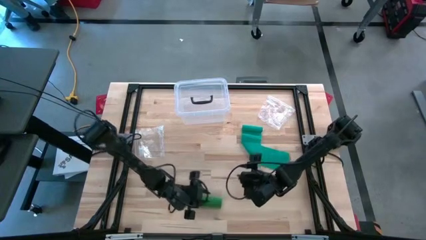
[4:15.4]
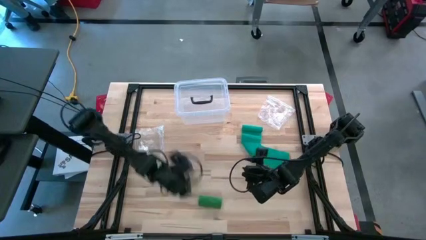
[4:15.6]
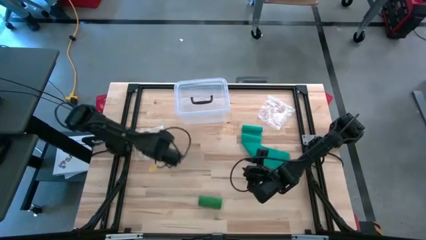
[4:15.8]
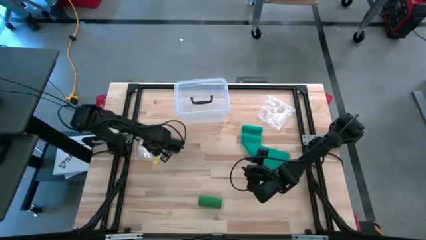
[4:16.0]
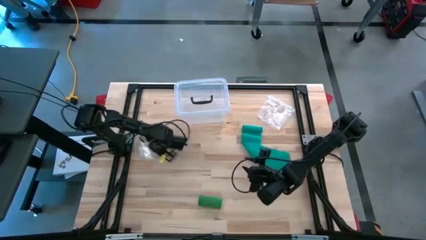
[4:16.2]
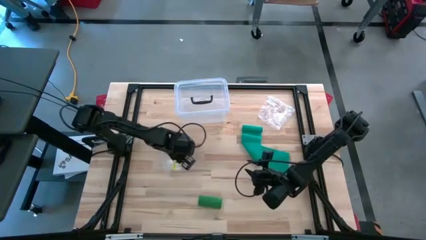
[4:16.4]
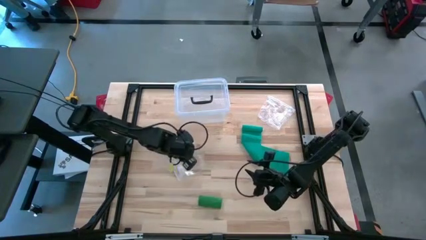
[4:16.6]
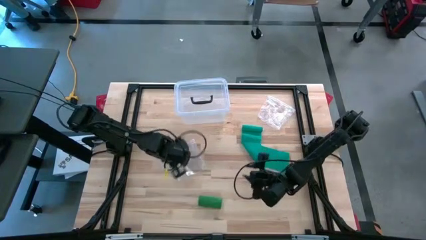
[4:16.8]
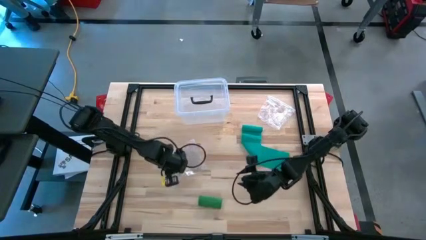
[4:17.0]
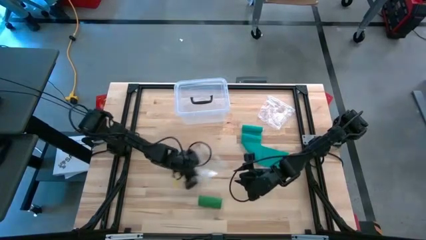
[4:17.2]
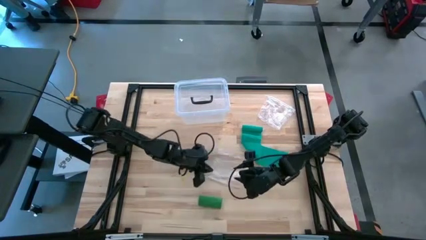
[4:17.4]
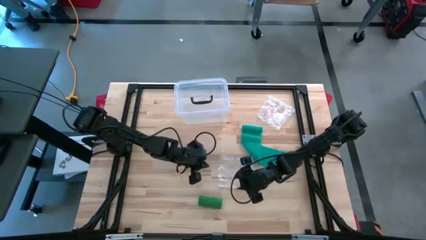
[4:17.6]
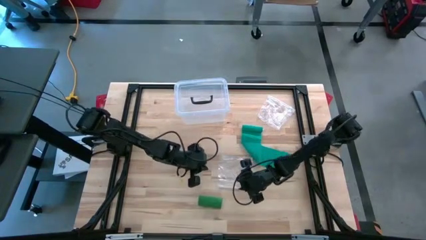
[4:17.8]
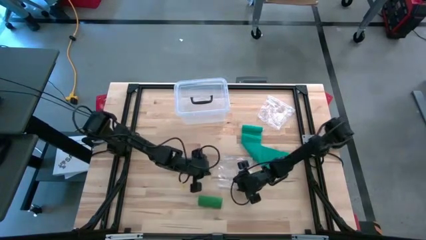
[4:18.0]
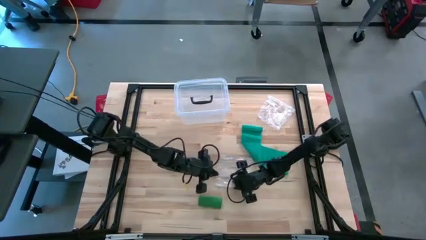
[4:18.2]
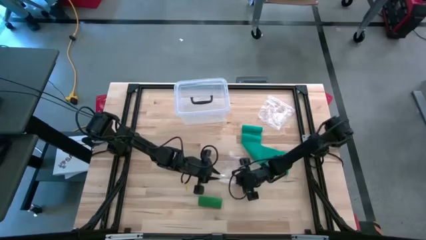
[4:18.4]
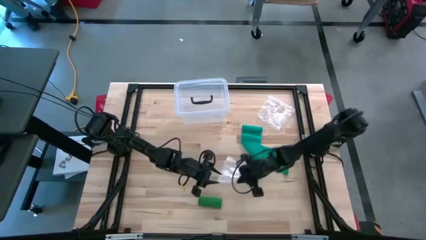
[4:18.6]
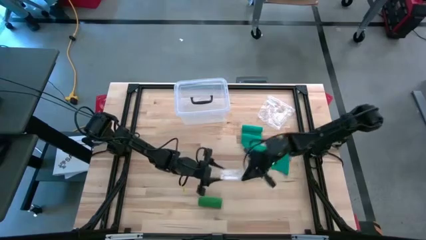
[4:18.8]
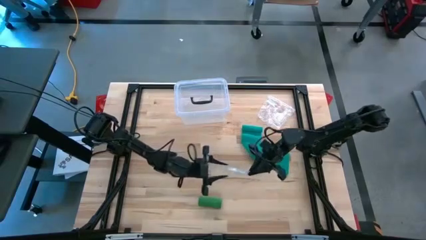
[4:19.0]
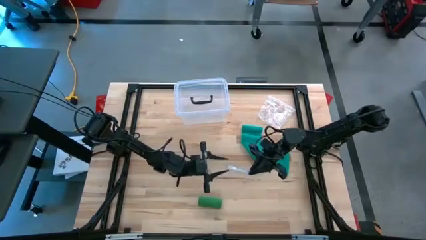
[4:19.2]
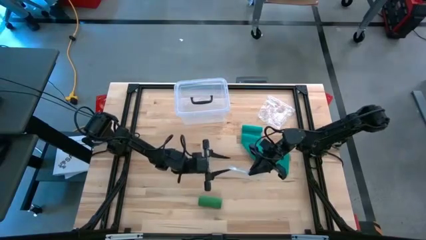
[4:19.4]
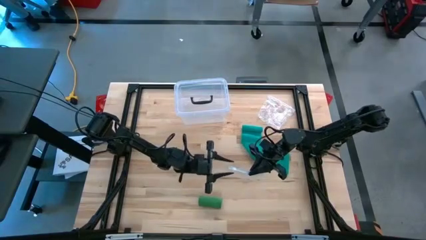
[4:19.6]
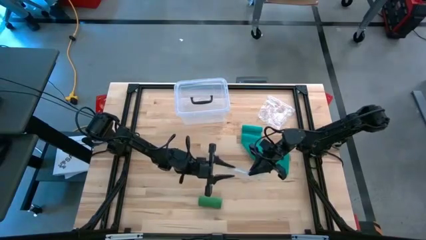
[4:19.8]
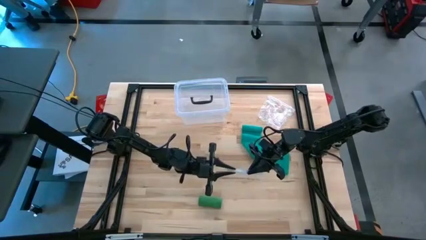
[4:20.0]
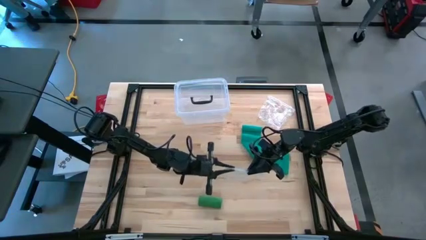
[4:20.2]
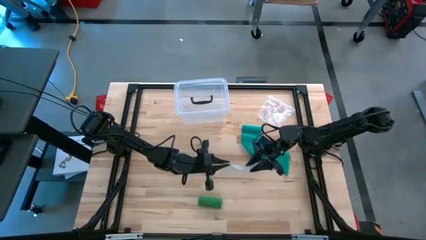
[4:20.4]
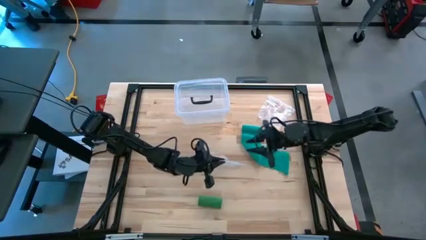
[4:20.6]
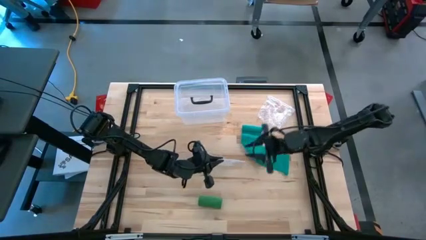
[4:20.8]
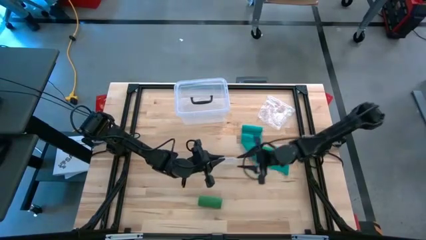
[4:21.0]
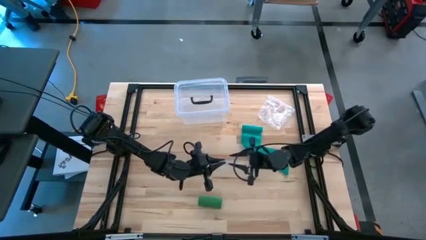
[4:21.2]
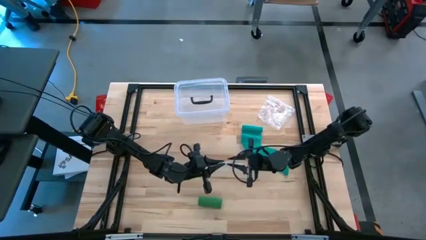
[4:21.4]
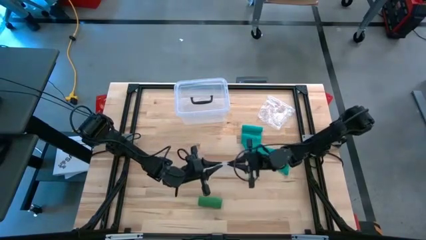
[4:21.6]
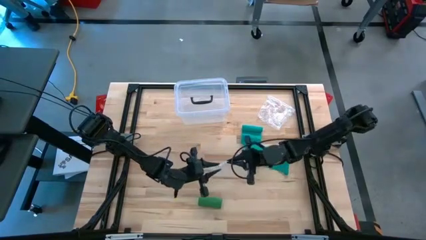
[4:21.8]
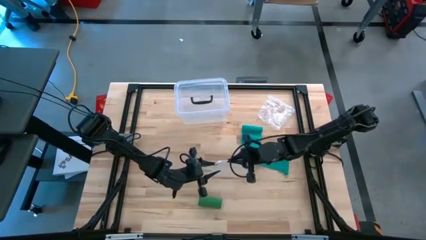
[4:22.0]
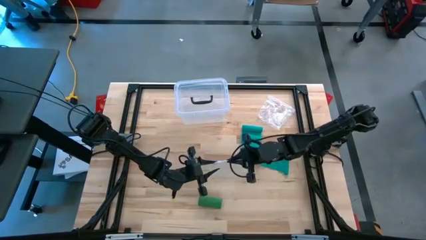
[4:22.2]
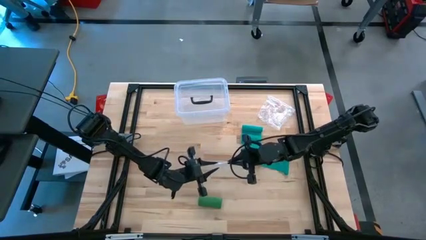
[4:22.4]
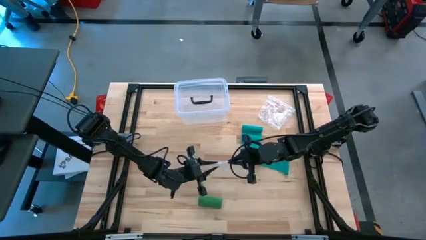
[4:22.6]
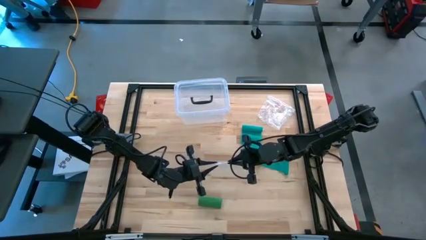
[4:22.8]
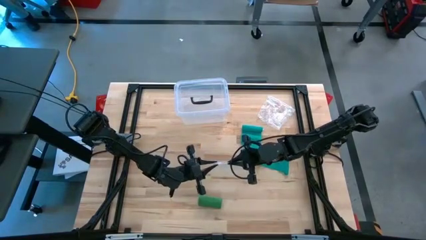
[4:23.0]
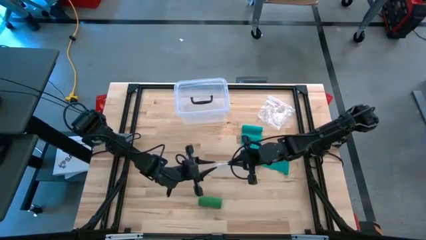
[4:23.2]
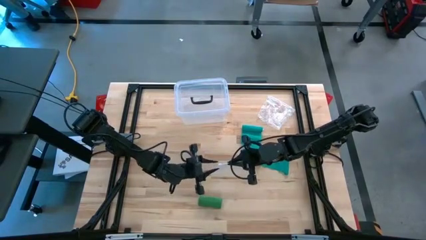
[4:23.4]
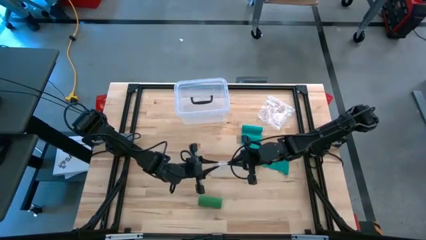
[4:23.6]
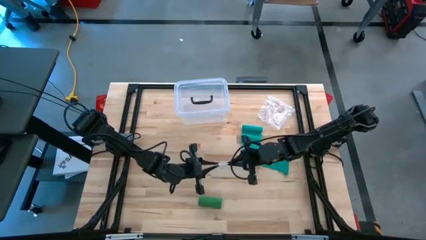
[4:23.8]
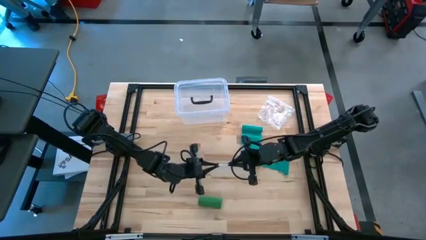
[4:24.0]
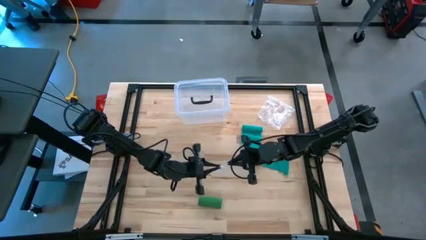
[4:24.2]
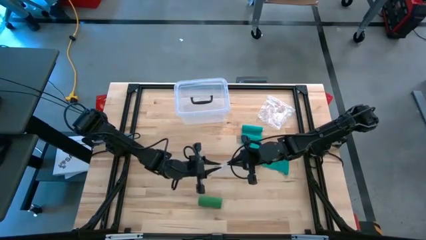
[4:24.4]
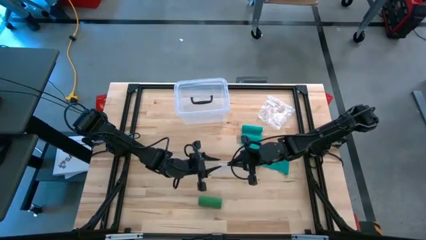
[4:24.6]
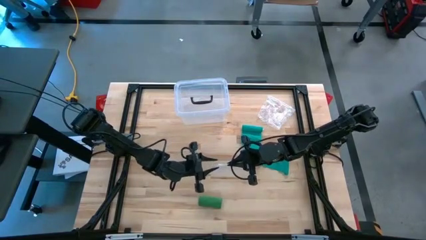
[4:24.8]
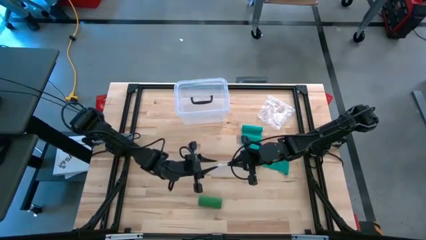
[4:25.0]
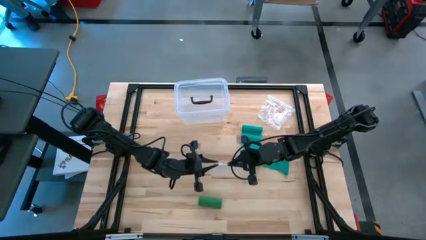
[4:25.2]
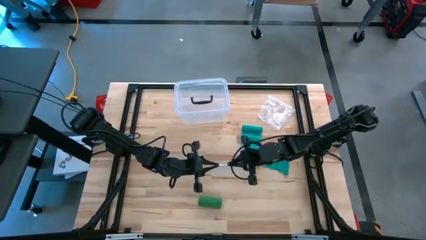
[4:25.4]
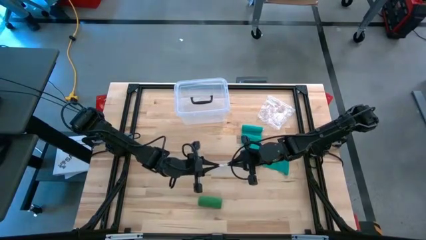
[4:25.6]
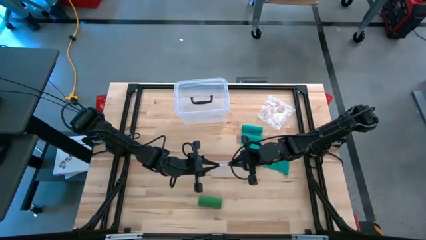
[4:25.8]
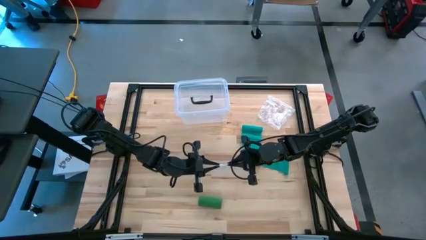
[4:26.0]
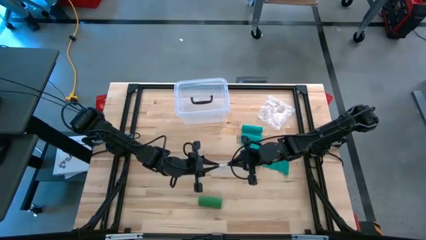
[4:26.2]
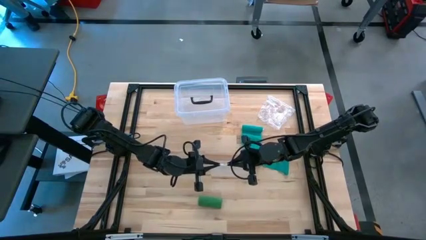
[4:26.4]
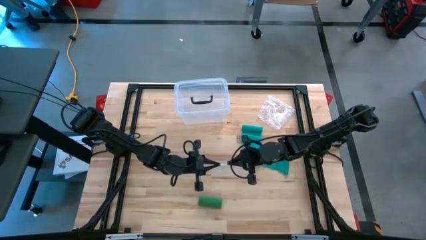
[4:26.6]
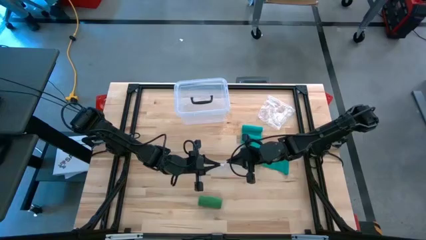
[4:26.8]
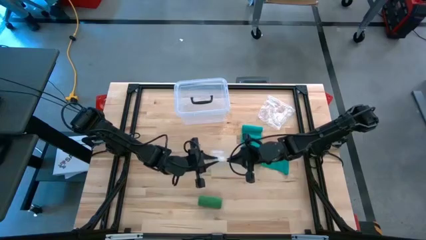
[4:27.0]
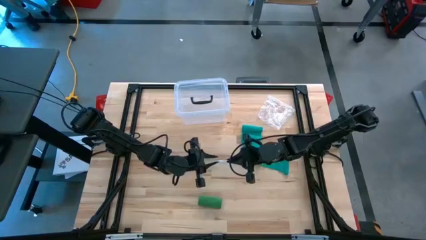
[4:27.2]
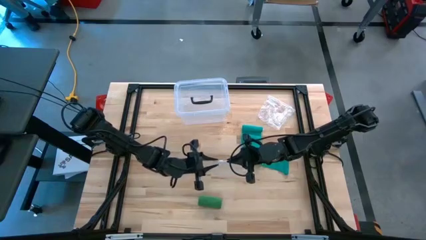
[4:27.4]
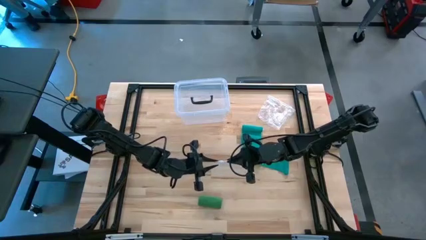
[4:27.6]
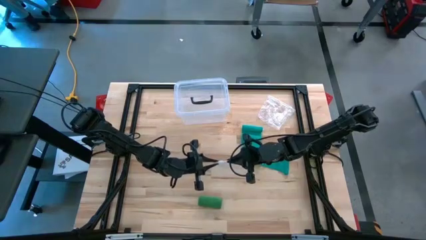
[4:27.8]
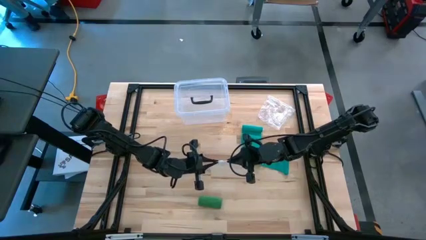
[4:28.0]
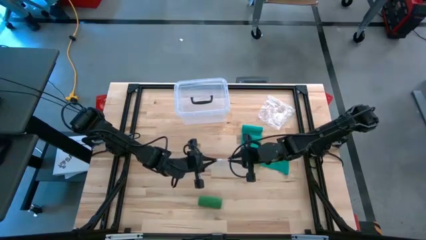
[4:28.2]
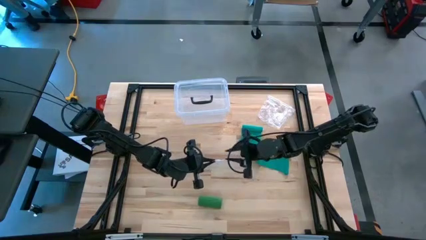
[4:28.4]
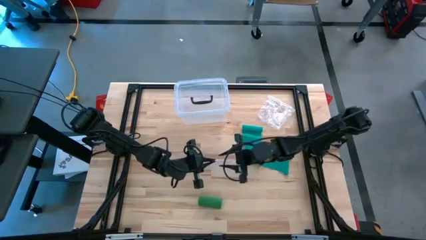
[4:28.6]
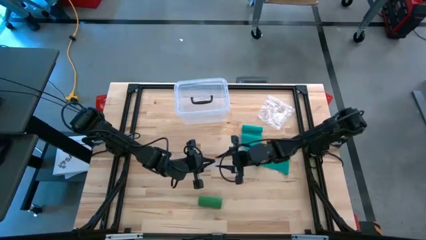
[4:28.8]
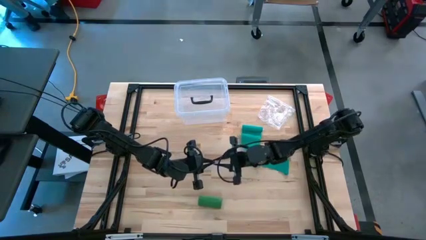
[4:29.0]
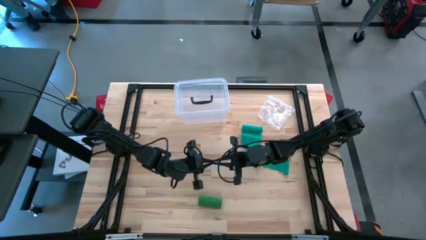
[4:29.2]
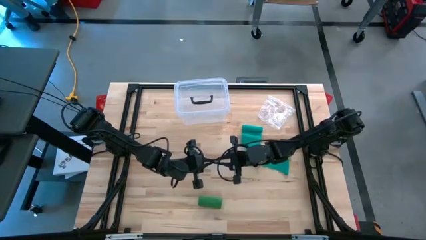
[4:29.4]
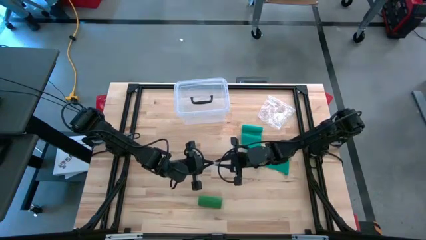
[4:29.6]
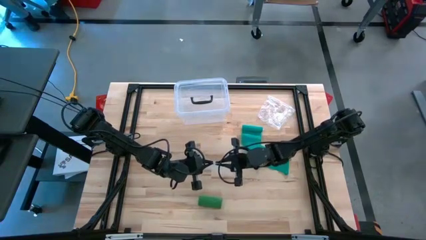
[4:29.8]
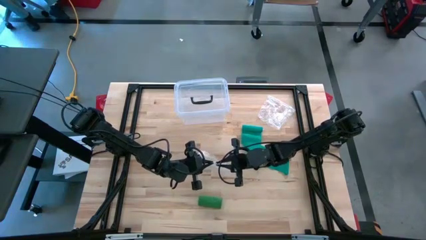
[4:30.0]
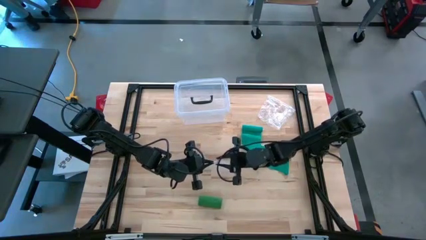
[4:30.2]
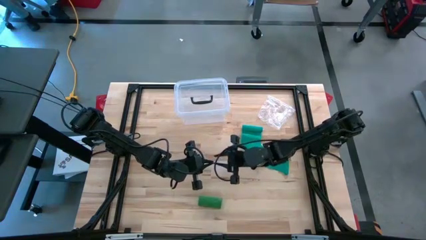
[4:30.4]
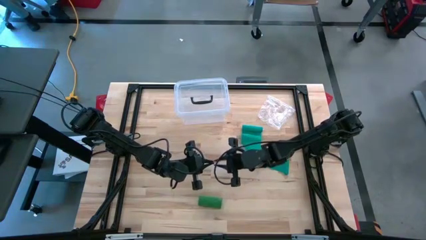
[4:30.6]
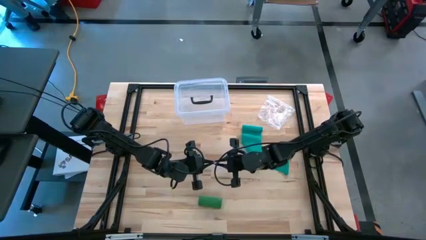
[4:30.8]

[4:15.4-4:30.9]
Task: Roll bandage
Open the middle left zip bag
